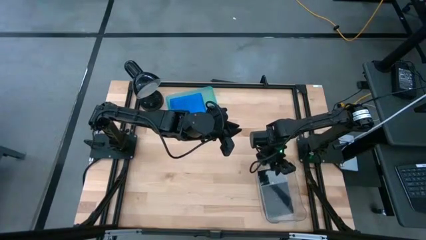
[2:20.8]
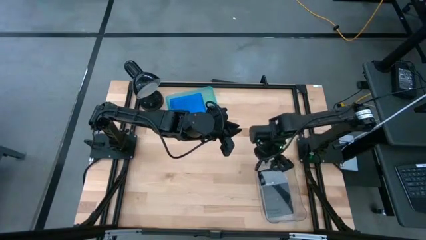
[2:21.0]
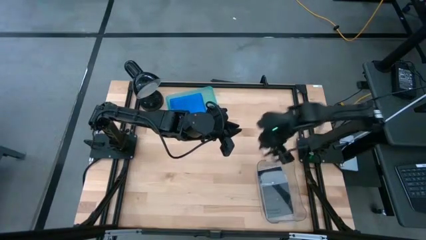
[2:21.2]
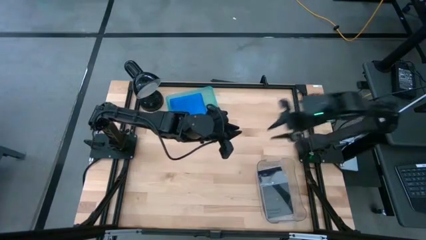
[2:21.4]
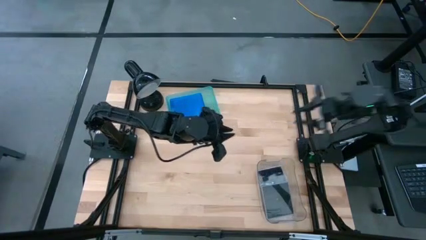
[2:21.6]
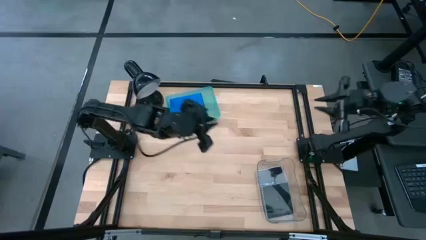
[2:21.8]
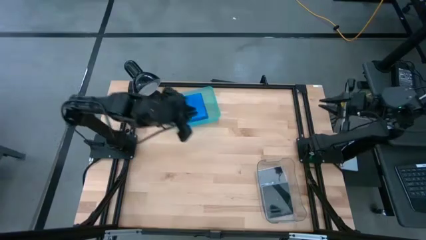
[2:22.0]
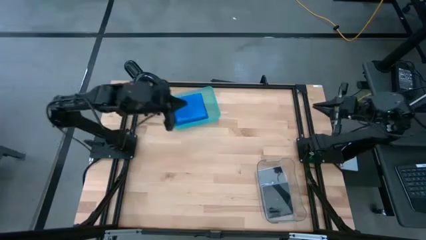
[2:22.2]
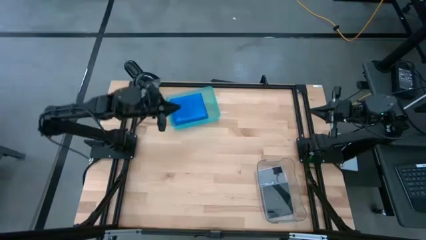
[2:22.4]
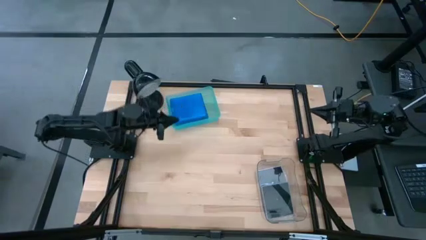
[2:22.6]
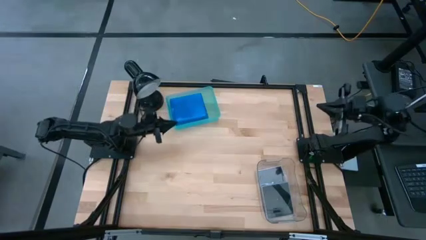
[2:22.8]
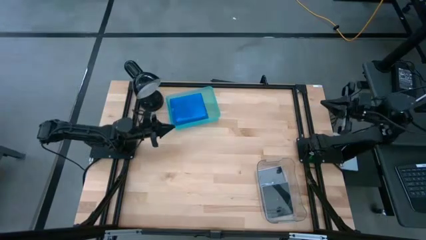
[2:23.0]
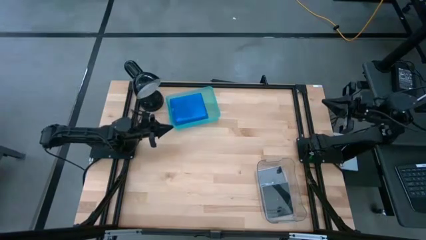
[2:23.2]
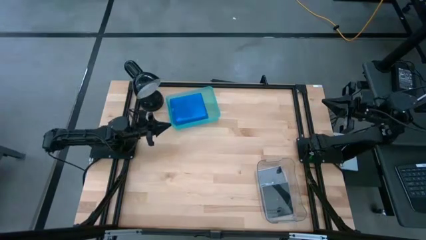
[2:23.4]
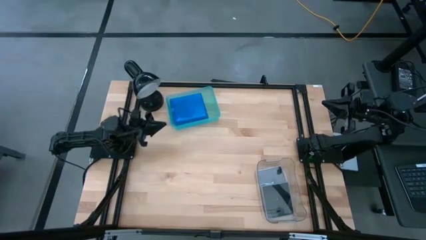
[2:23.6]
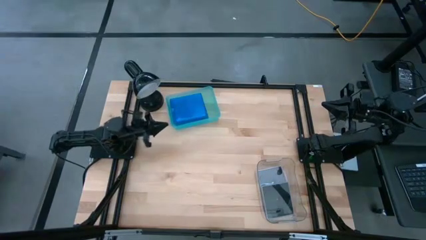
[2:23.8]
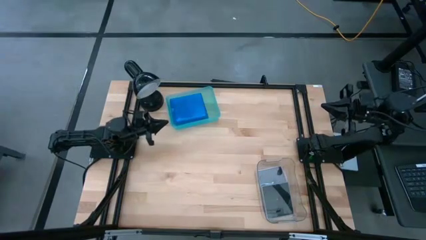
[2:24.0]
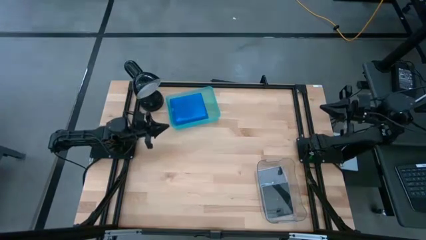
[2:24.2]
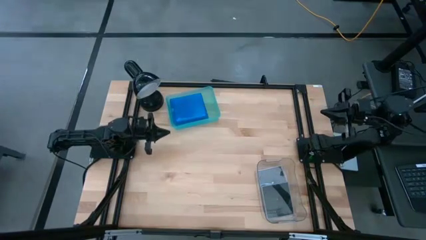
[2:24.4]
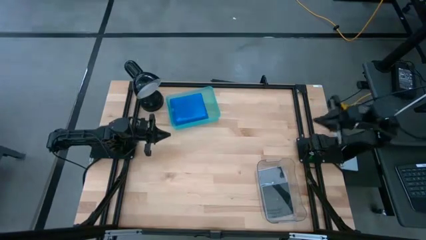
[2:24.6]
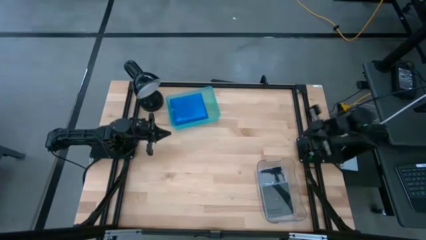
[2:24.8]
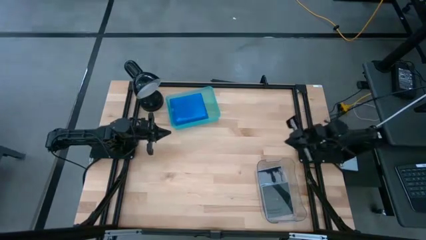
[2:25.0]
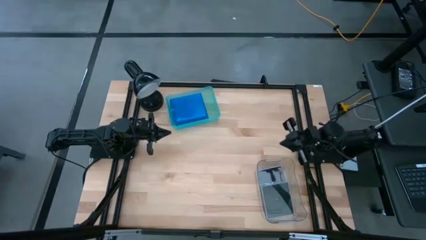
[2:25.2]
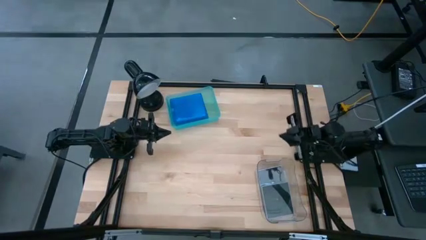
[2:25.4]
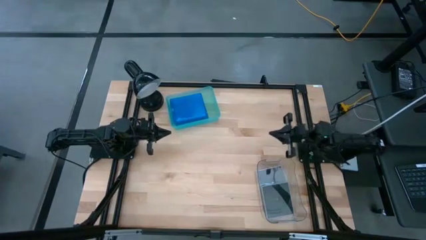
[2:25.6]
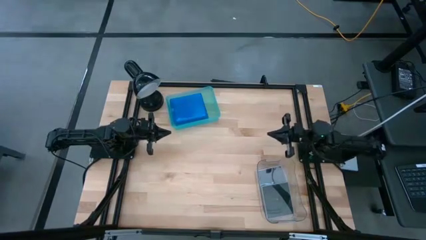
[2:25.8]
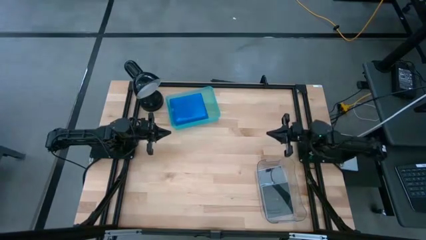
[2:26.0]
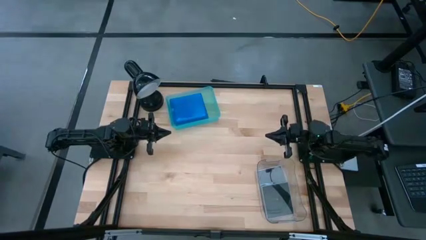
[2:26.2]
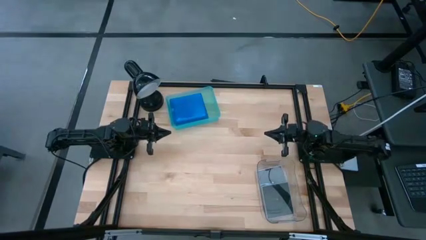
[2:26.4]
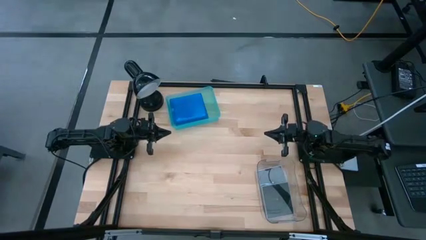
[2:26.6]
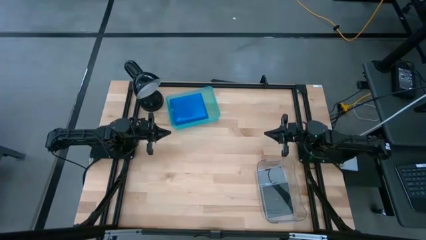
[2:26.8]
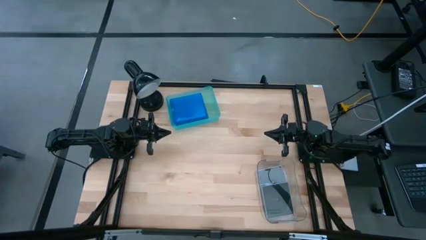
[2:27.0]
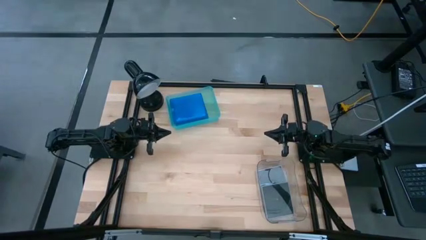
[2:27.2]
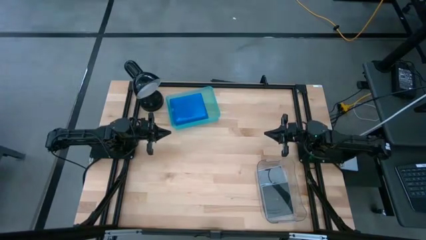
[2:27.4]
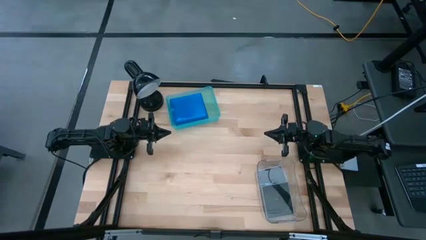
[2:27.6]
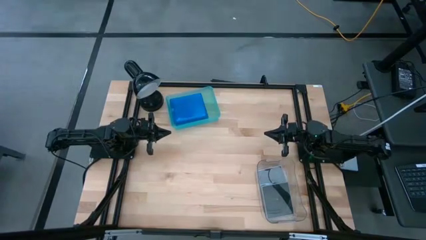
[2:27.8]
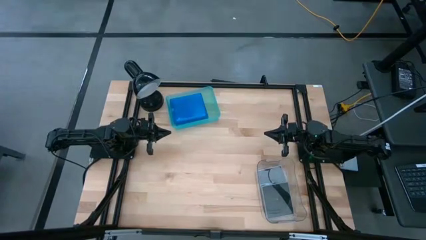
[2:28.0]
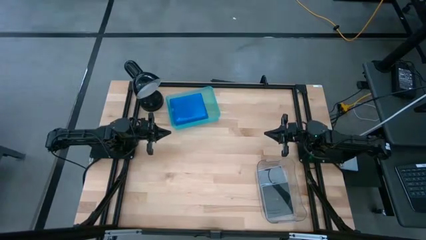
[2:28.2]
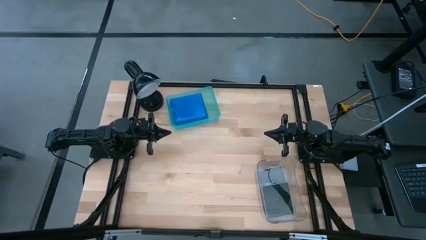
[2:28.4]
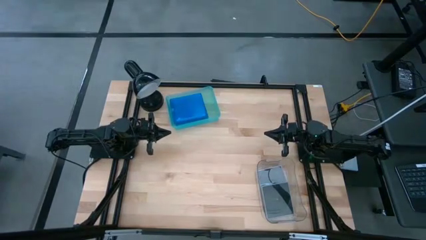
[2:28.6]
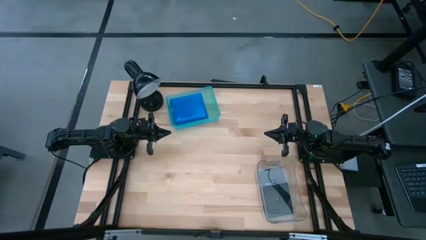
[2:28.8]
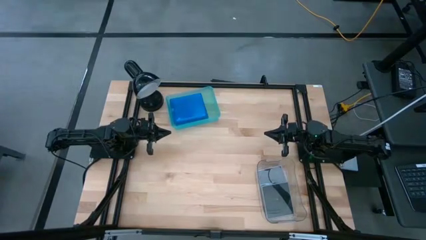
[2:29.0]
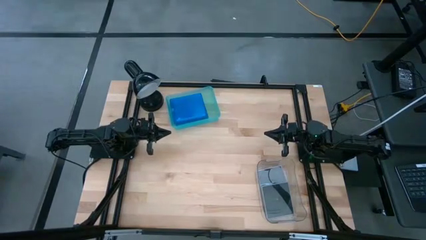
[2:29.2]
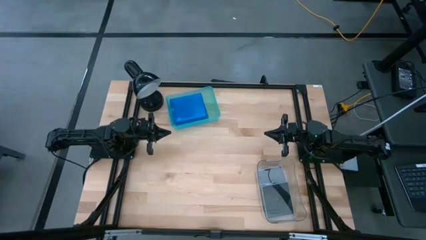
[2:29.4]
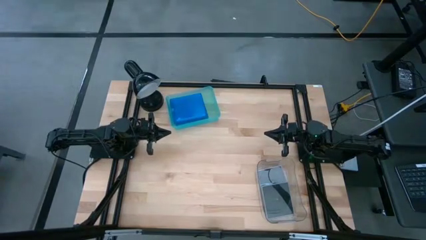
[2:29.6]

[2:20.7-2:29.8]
Task: Pick & place jewel cases by type
Return to Home Position

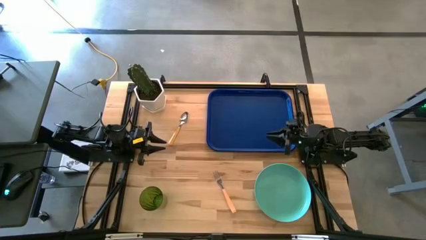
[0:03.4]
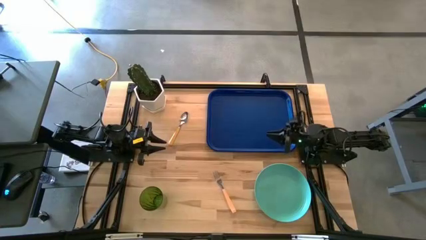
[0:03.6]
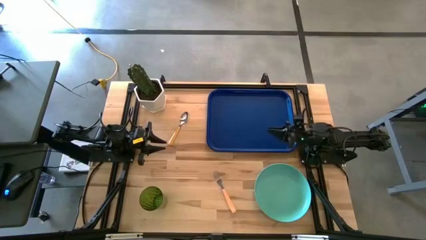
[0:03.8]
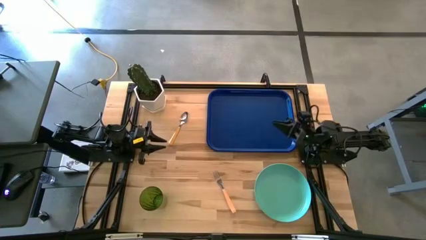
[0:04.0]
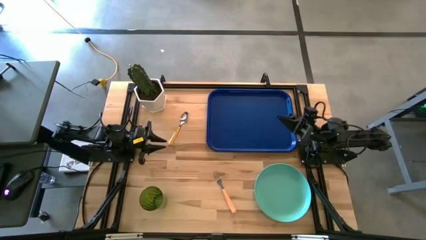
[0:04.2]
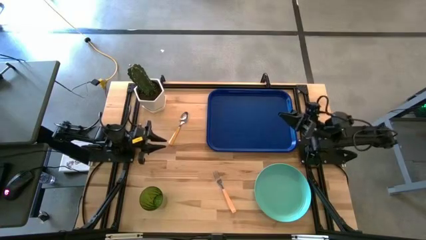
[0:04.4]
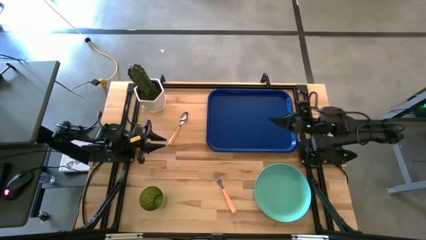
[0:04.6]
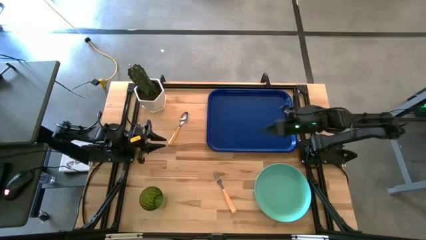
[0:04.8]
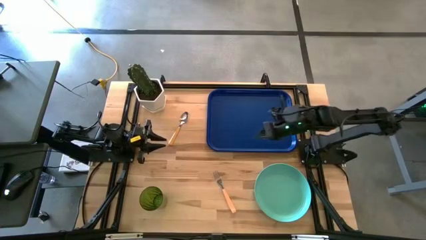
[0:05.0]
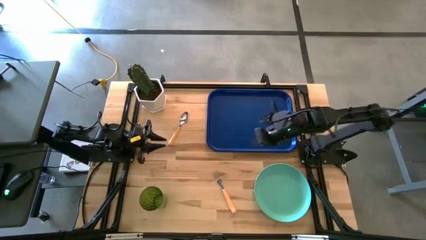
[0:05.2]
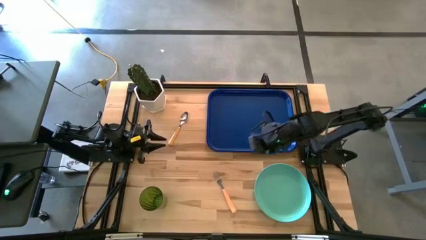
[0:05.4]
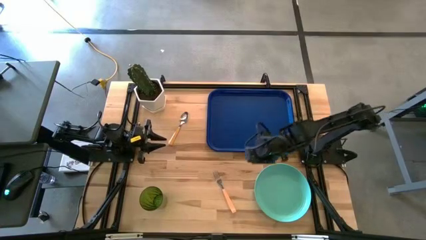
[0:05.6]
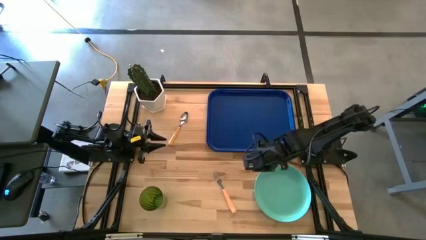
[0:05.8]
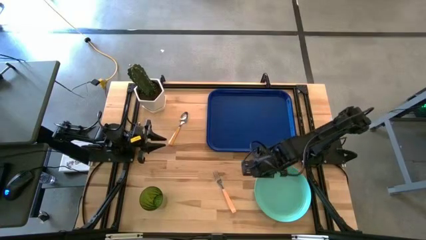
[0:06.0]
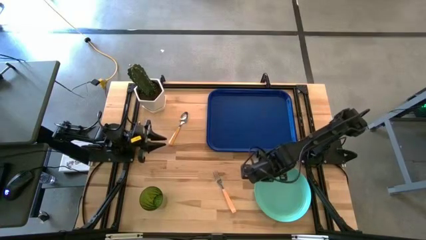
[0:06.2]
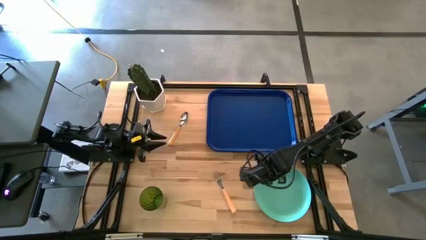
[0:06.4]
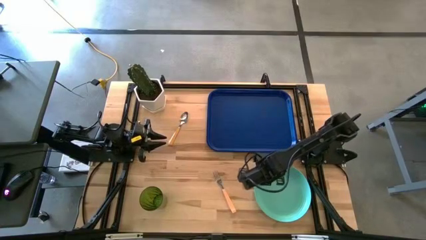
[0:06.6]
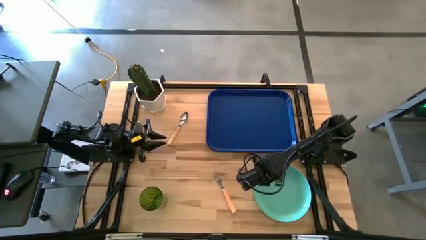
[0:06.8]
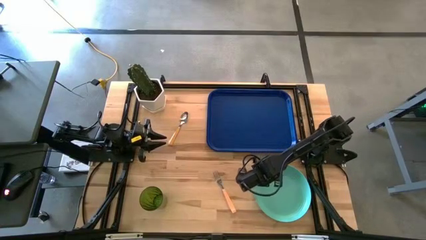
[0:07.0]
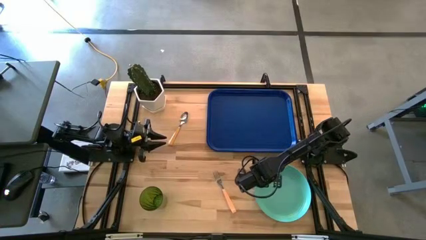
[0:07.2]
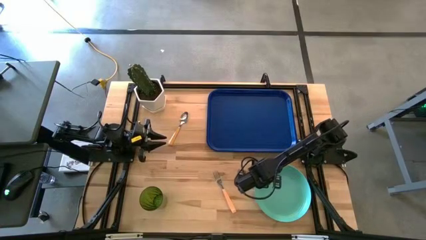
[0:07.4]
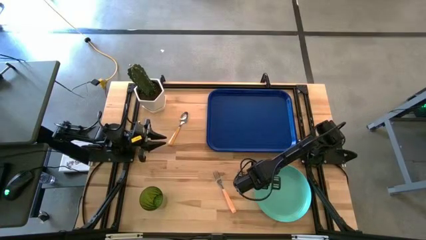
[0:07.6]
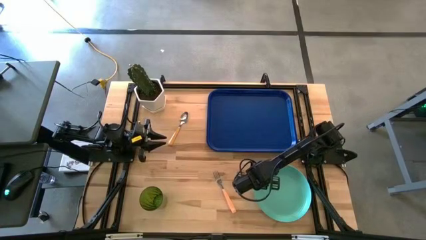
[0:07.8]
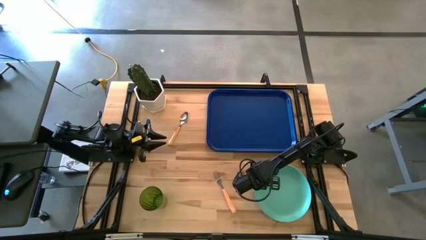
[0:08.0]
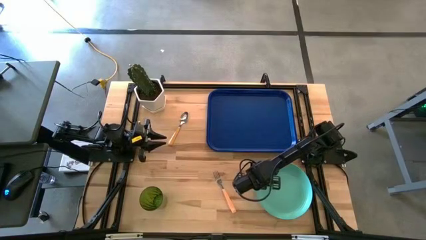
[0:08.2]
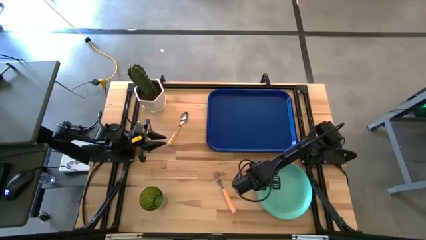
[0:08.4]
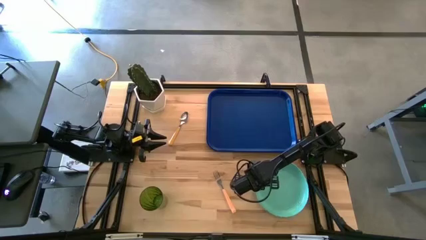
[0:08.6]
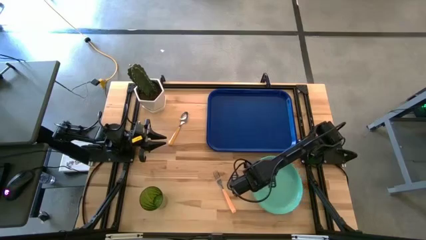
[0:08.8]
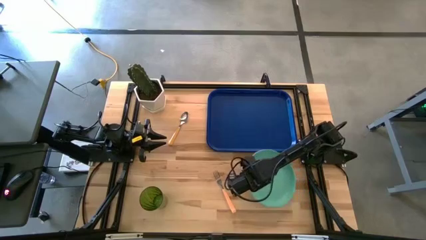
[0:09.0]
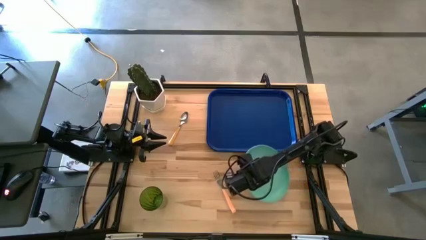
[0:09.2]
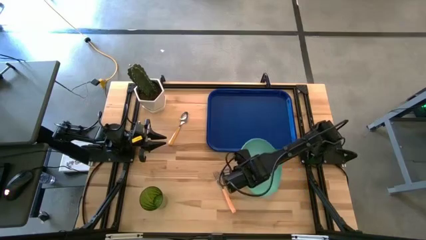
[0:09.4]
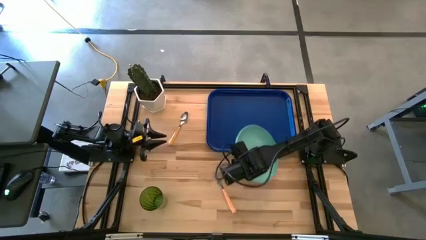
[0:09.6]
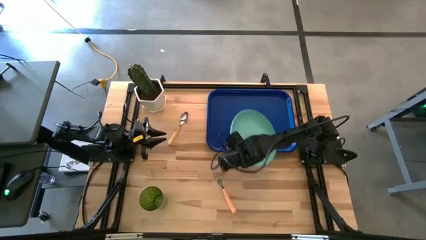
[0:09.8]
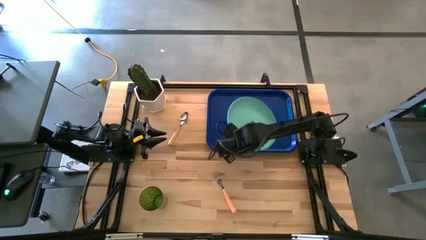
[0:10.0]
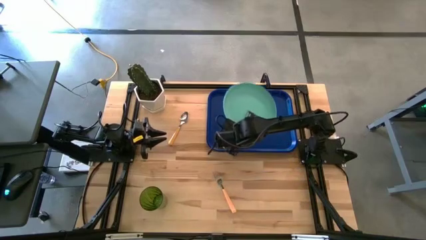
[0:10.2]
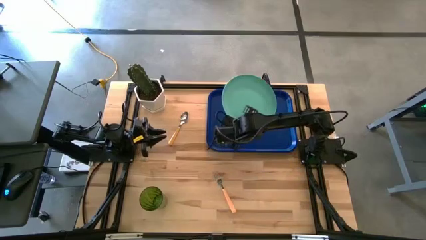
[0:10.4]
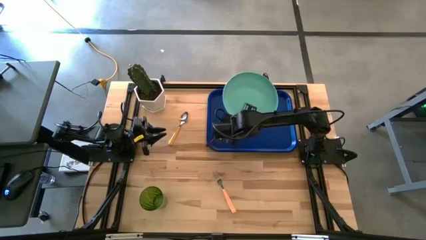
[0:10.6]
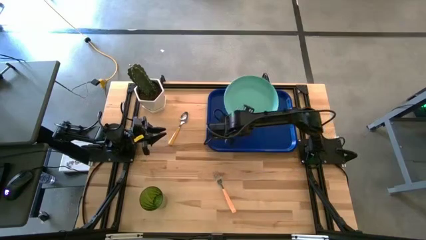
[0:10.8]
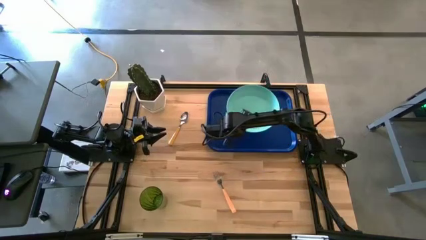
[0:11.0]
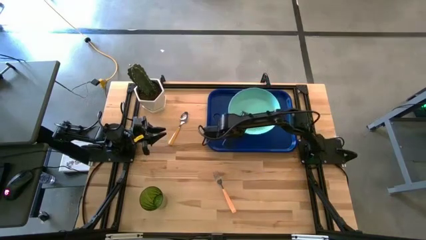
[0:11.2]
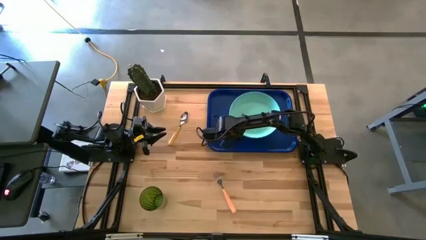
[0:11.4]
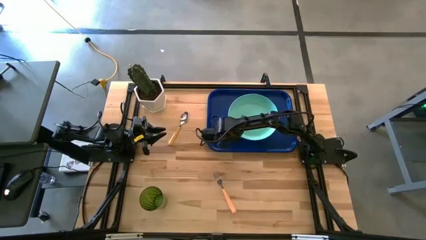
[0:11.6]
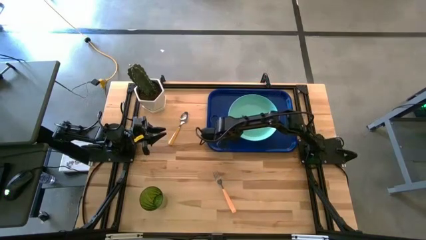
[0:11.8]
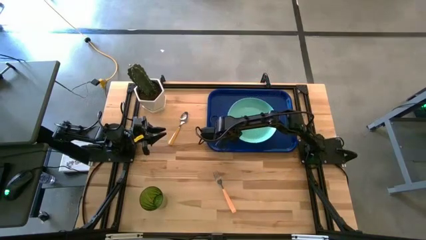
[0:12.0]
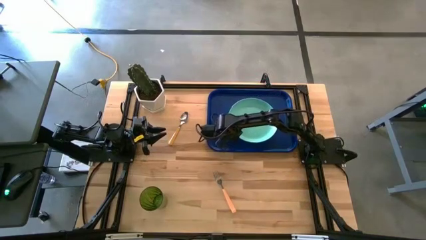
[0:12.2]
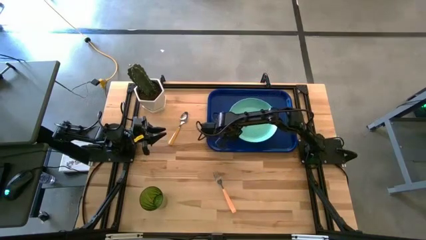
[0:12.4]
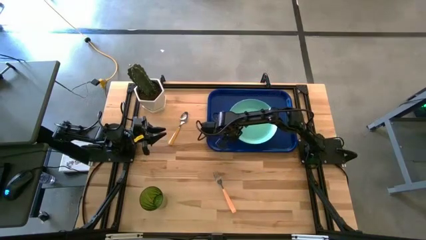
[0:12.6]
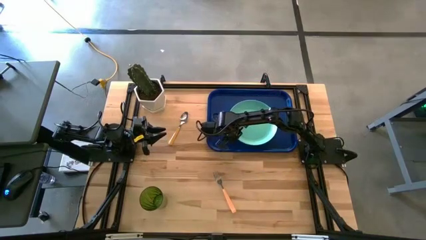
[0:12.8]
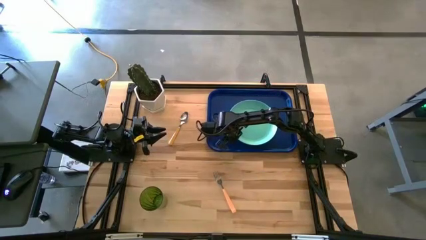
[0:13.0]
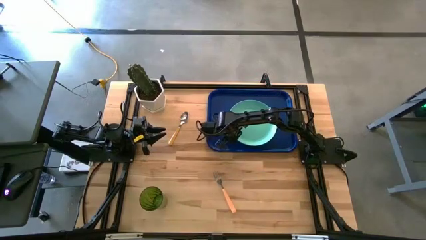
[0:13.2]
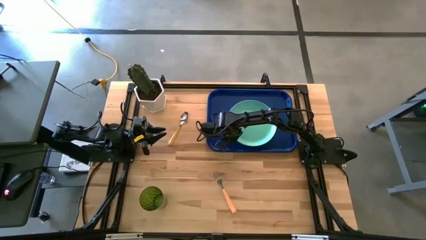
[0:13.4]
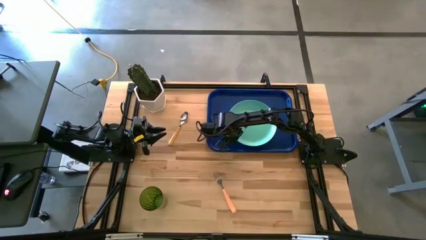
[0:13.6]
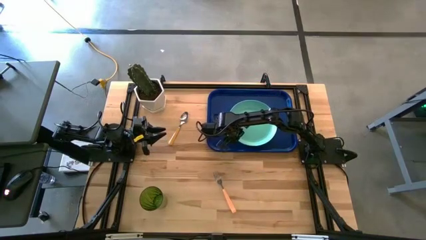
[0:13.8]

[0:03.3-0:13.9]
Task: Pick and place plate/cup/fork/spoon on tray
Put the light green plate on the blue tray
